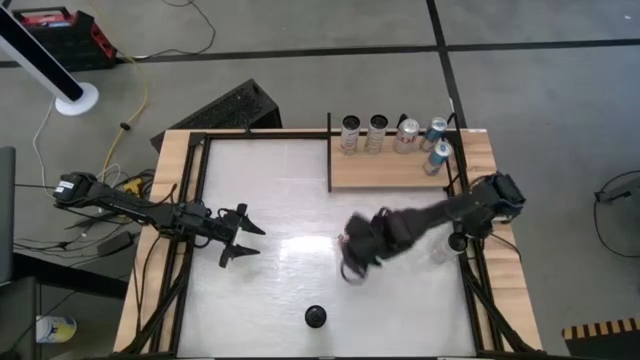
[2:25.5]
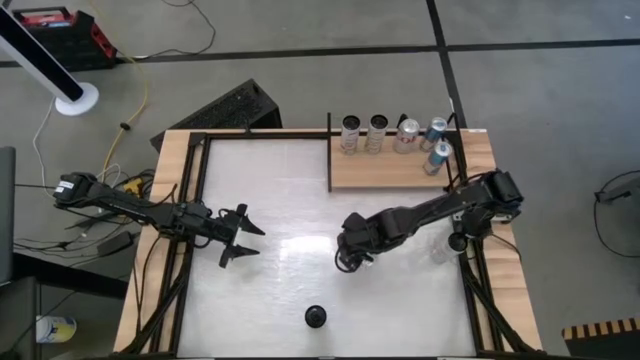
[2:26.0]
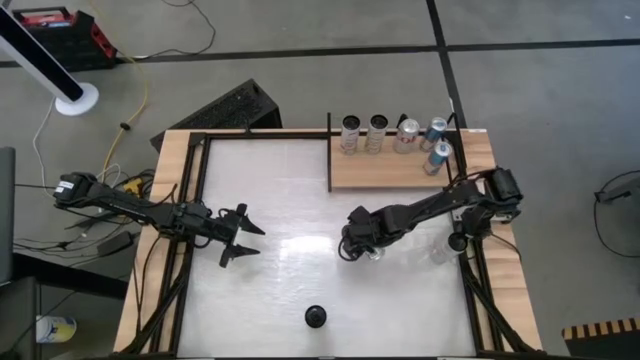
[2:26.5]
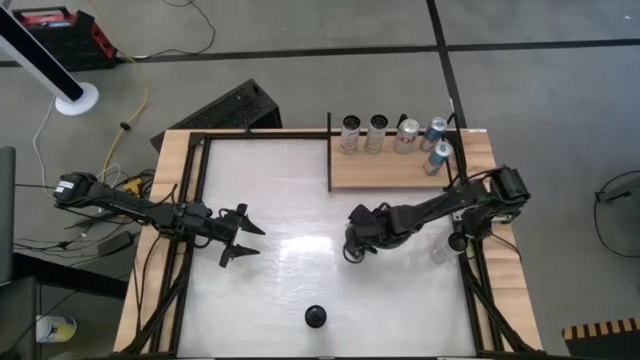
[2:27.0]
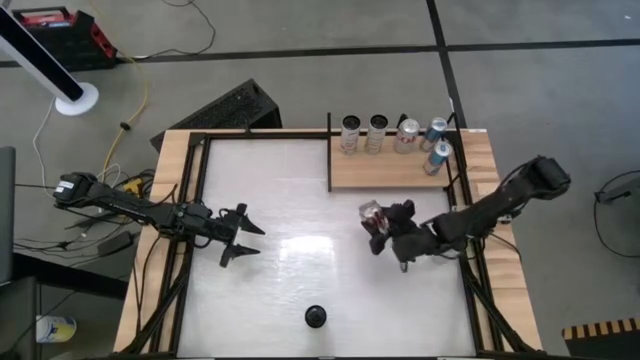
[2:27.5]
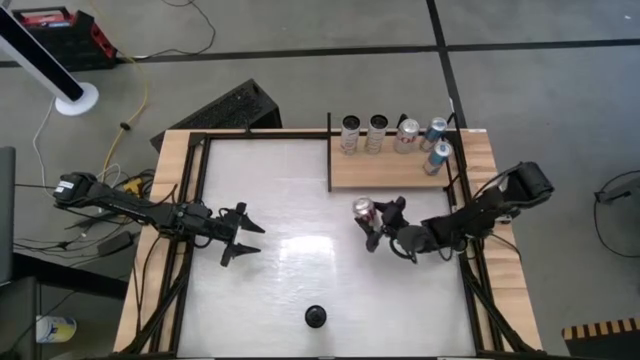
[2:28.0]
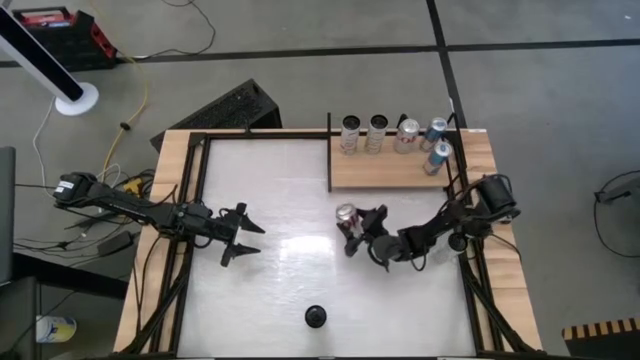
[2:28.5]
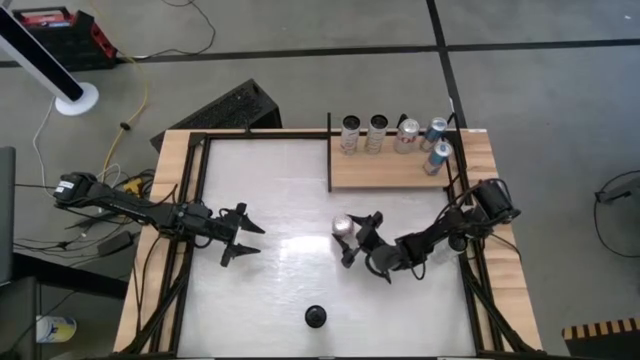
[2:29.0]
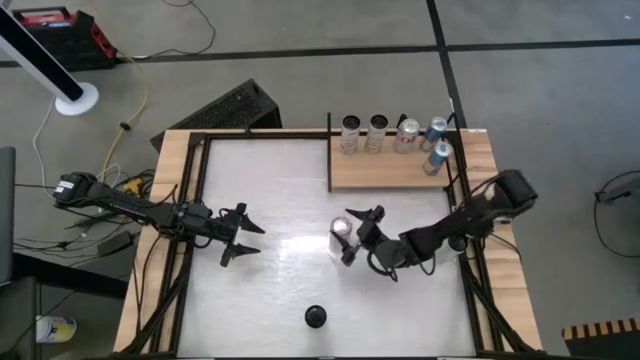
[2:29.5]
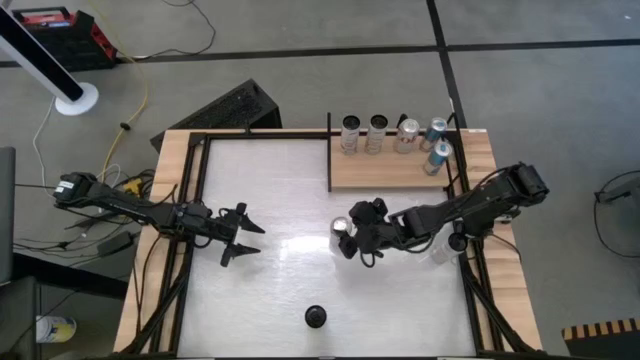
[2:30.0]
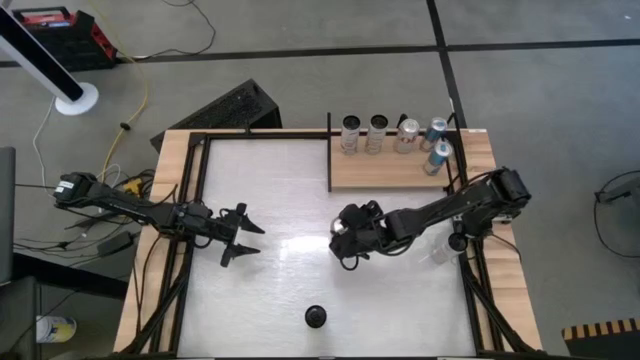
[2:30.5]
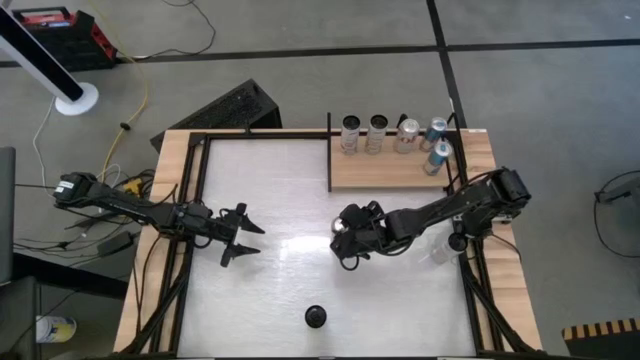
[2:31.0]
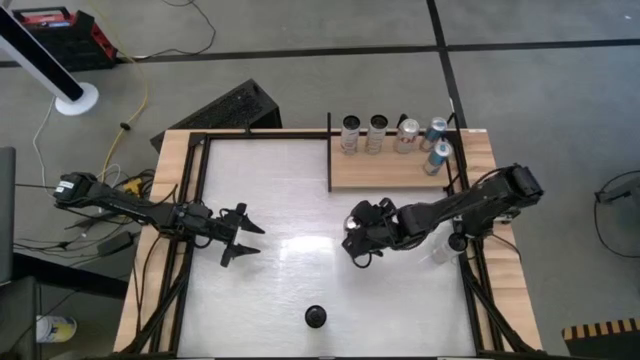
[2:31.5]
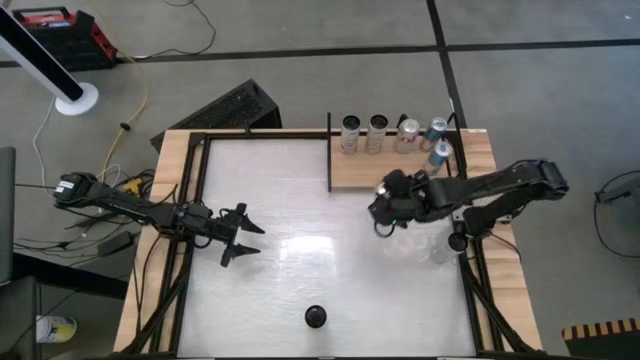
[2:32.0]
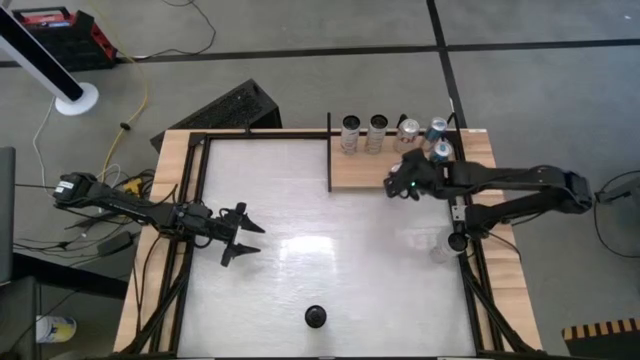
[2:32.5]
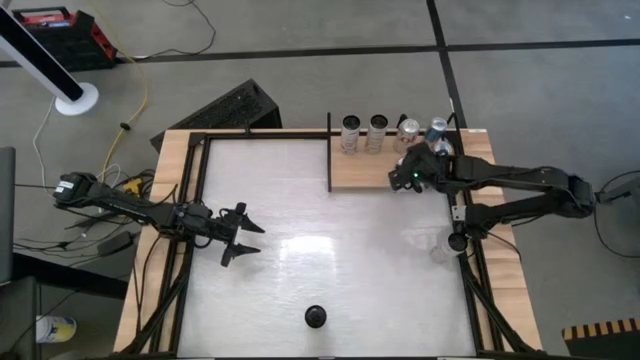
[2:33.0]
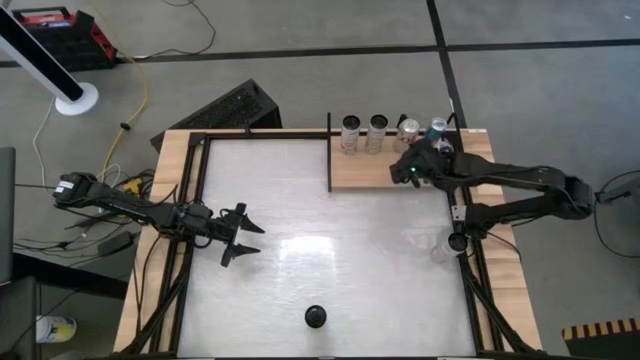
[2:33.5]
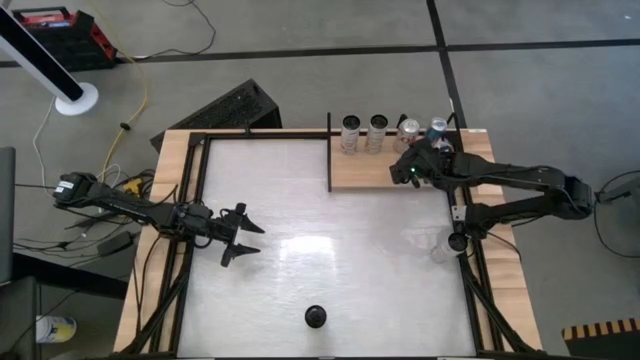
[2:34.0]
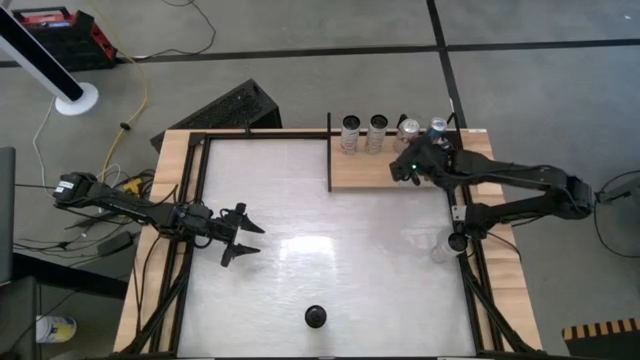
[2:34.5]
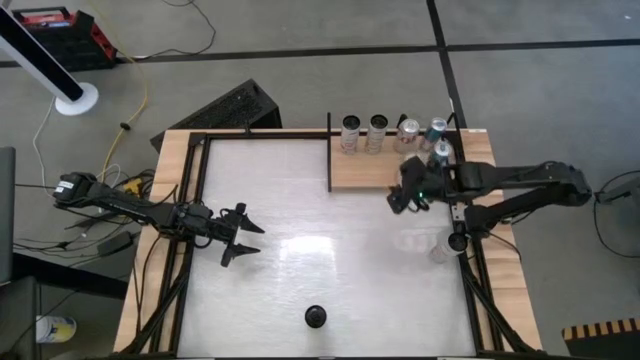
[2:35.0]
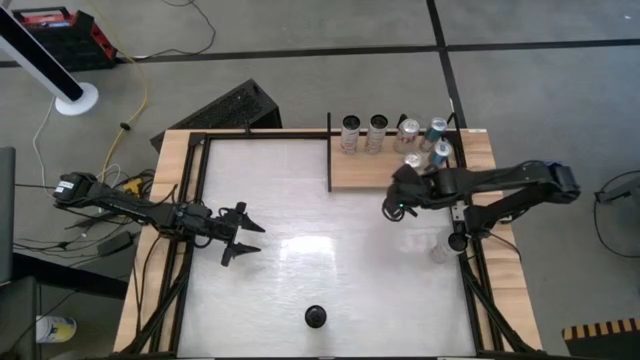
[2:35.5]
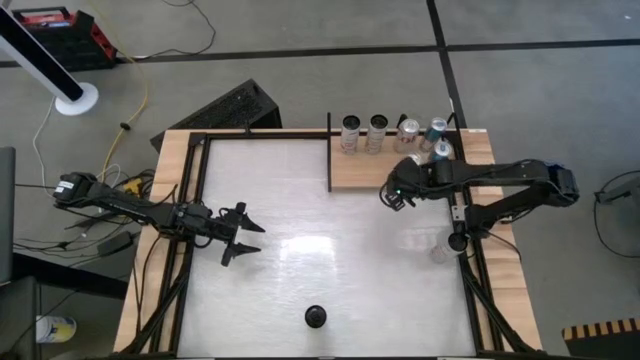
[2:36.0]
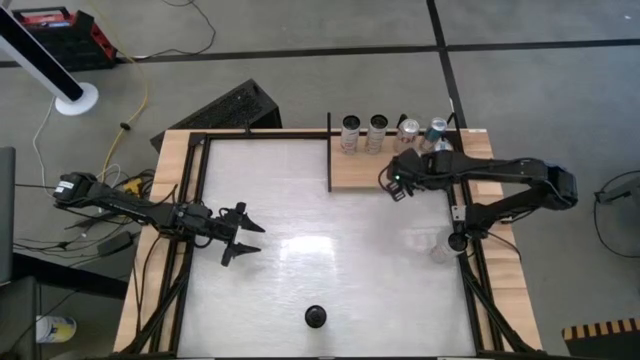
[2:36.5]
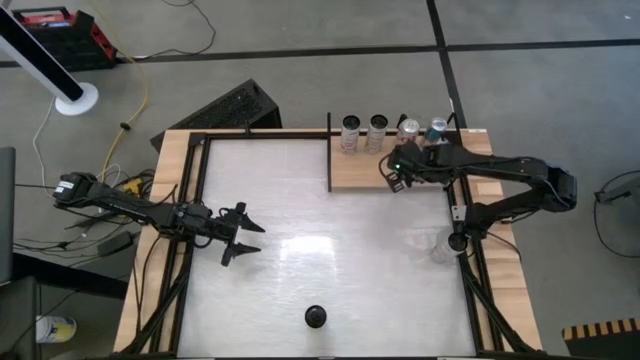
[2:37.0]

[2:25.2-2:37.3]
Task: Place canned beverage on shelf
Put the silver soda can on the shelf aligned with the other silver soda can

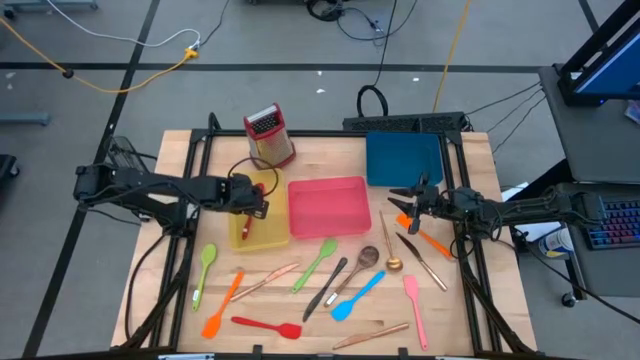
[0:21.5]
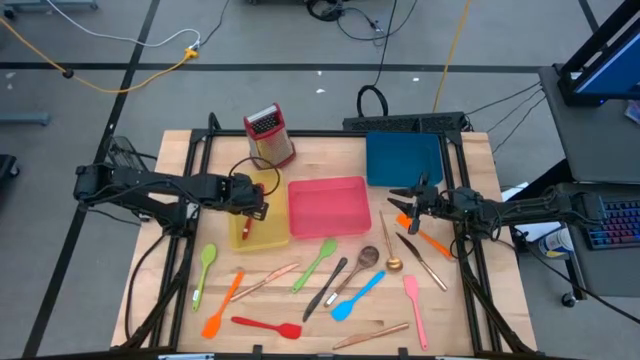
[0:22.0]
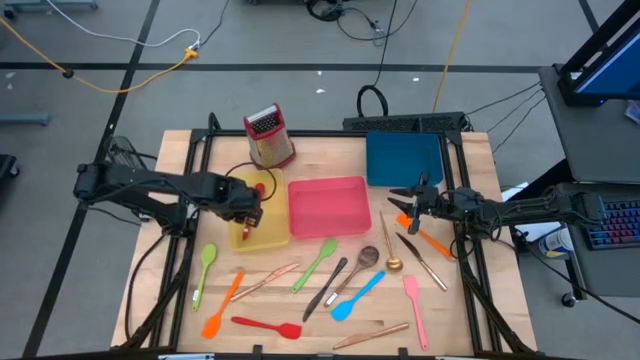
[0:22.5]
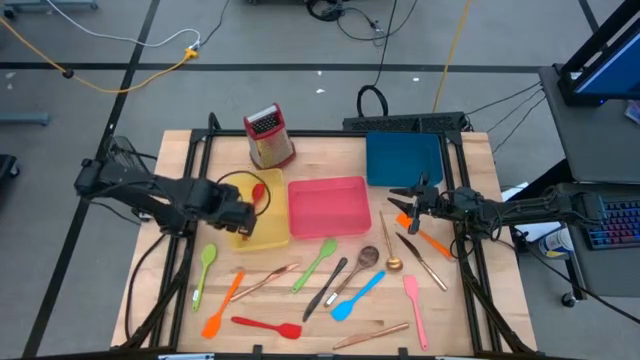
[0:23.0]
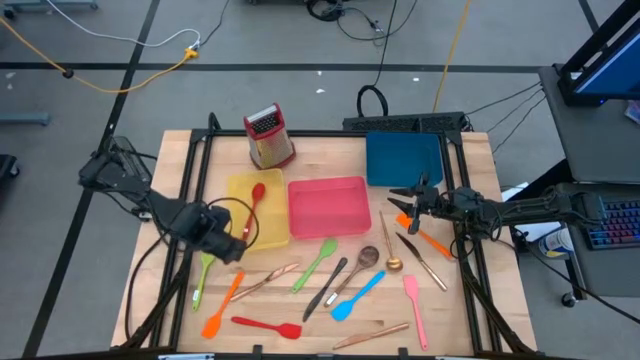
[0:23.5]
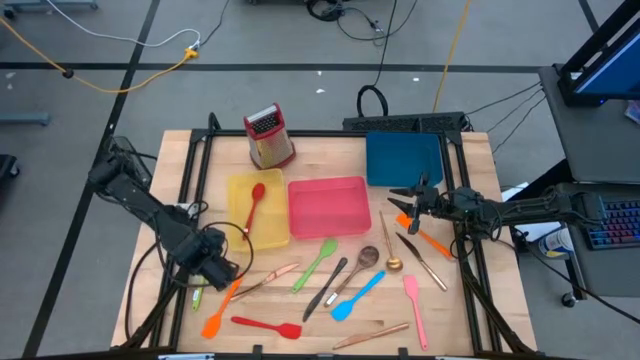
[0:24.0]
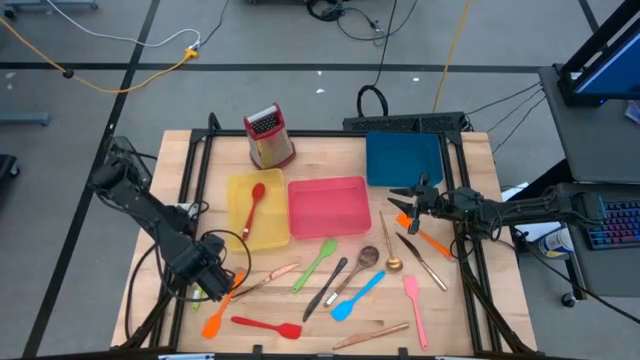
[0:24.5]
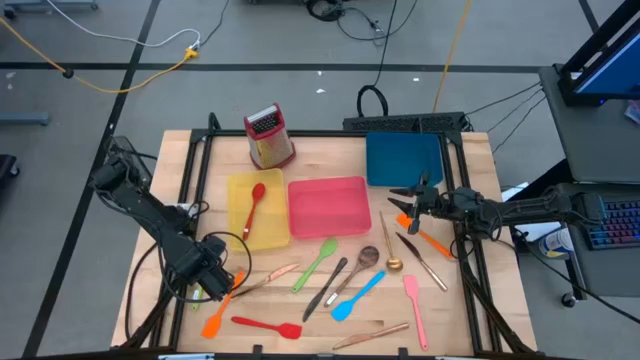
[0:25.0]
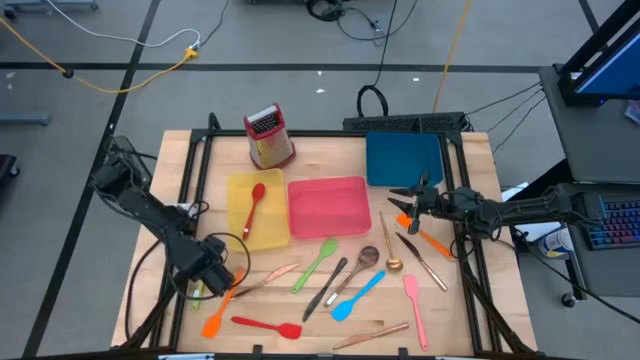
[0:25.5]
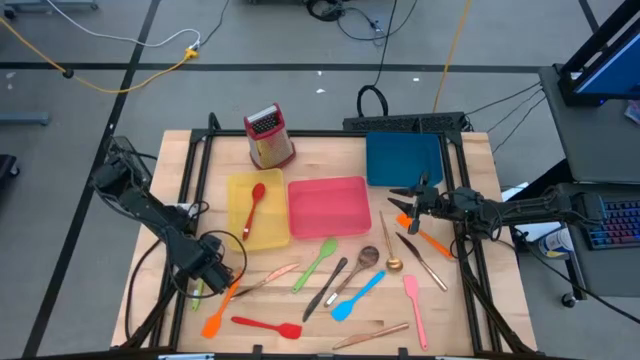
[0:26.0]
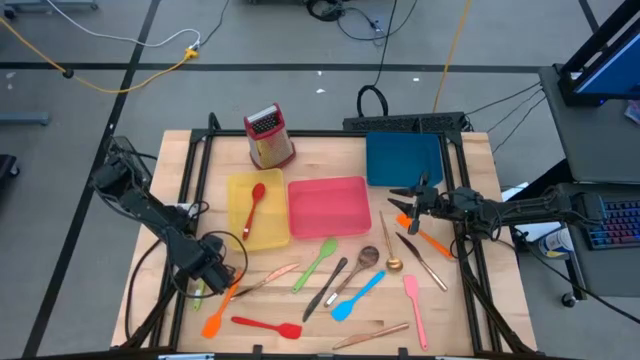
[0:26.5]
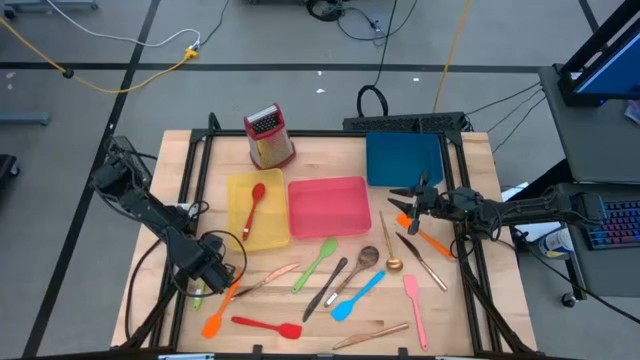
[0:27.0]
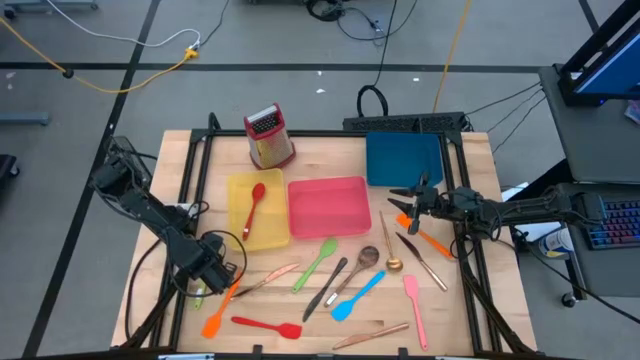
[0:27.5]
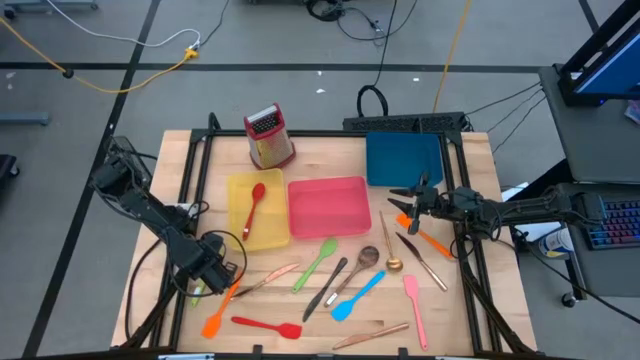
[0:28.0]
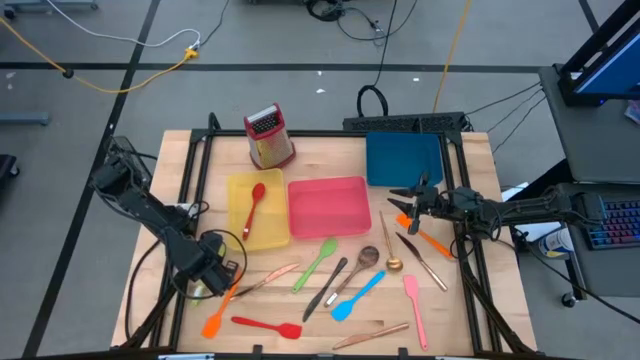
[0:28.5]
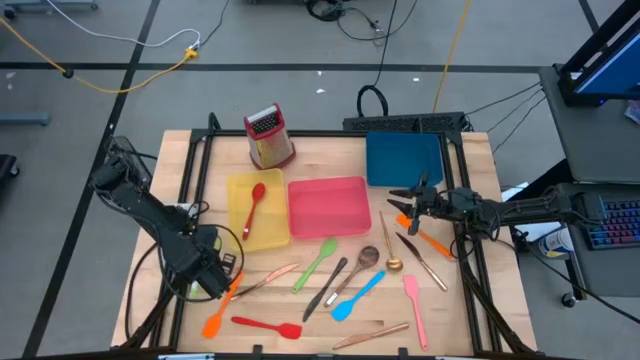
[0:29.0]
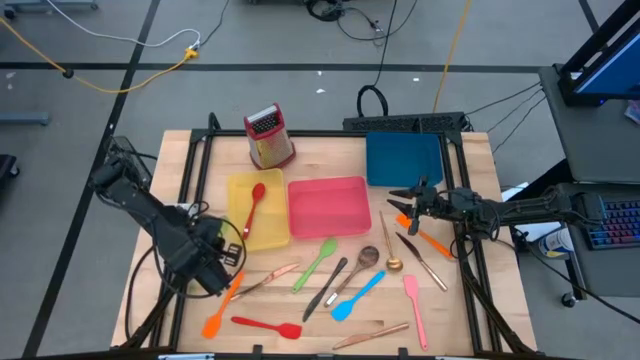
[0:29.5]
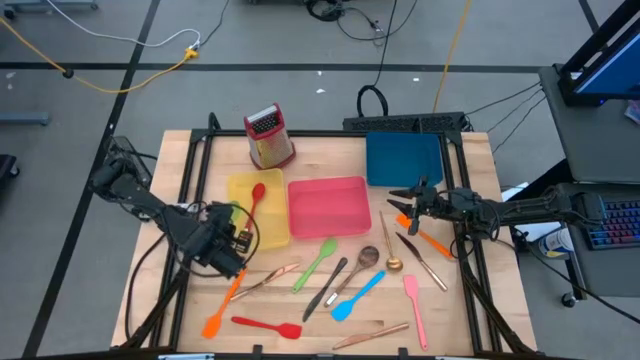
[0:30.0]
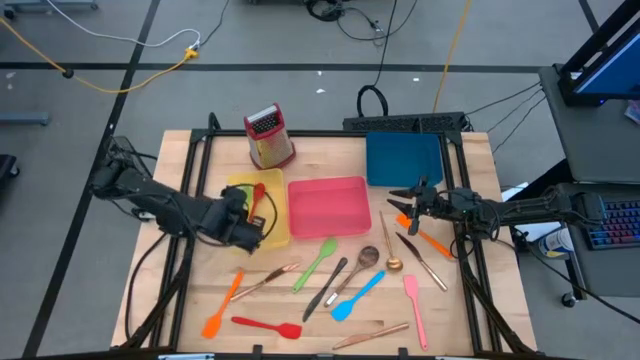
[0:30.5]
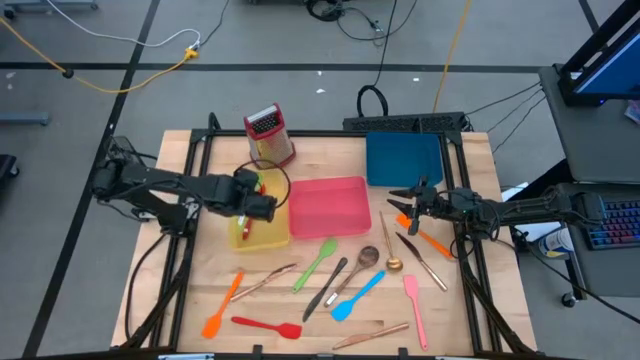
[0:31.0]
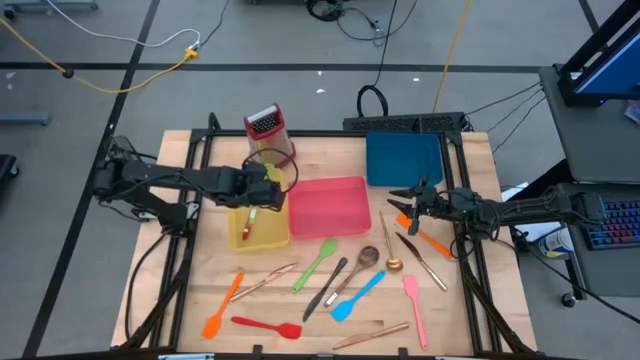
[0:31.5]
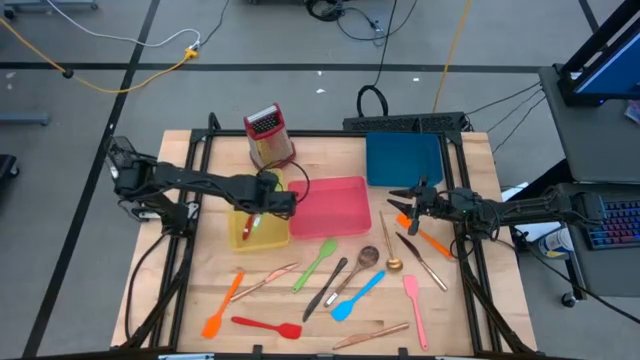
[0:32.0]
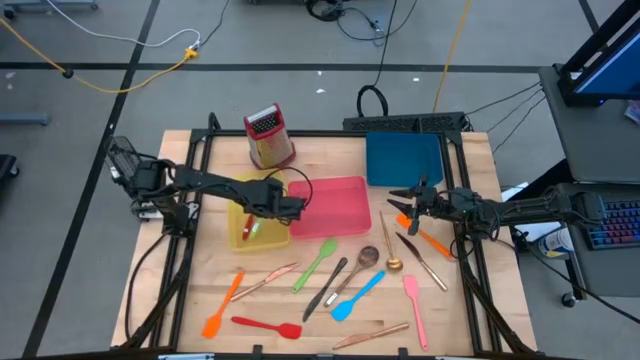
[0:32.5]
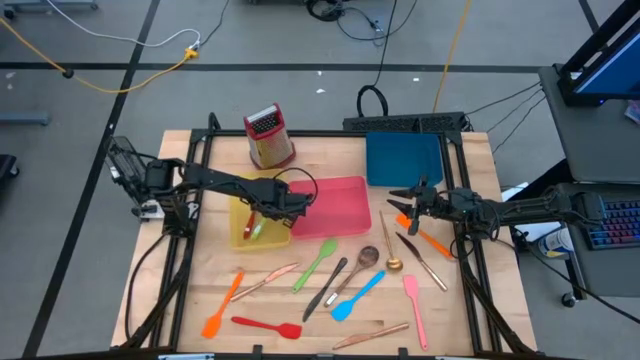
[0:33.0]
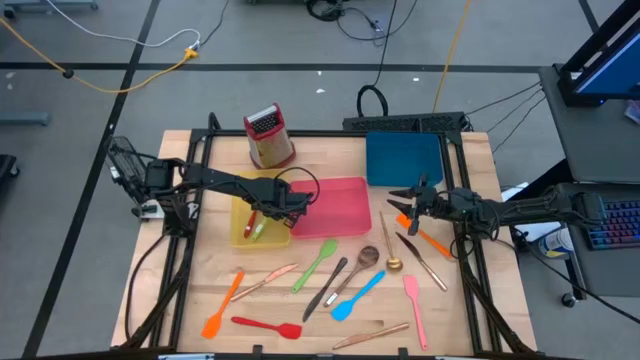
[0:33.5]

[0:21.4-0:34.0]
Task: Pick & Place Kitchen Items
Put the green serving spoon into the yellow bin
